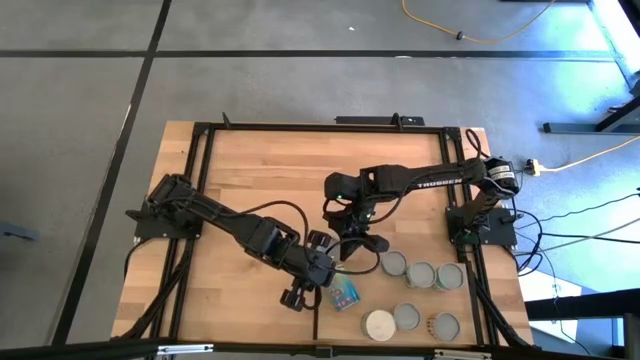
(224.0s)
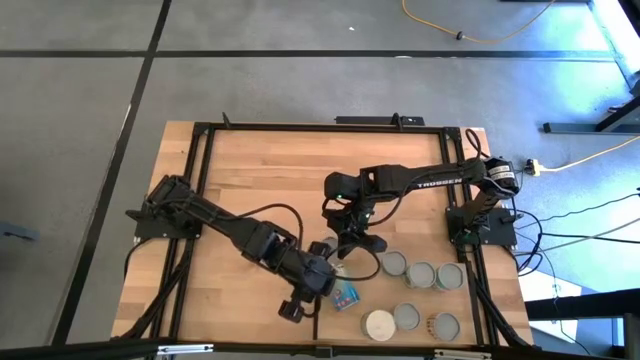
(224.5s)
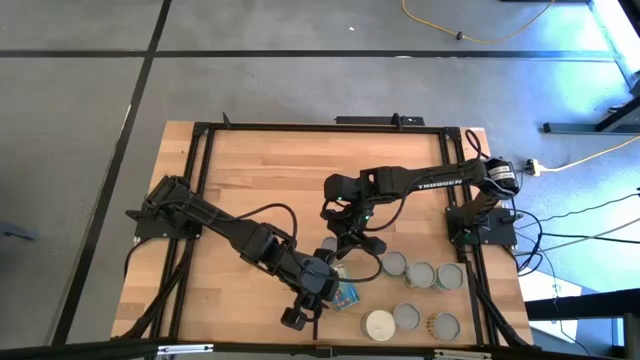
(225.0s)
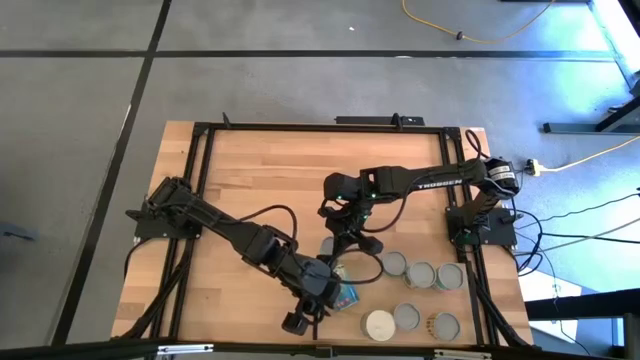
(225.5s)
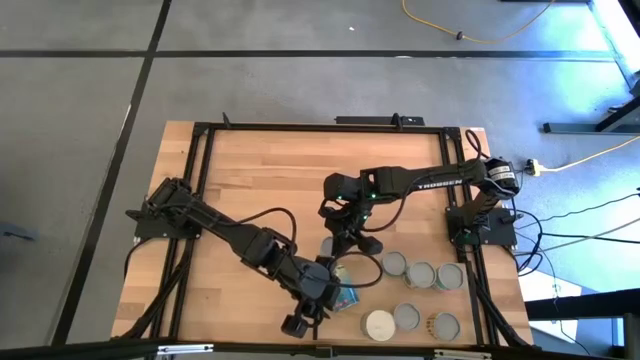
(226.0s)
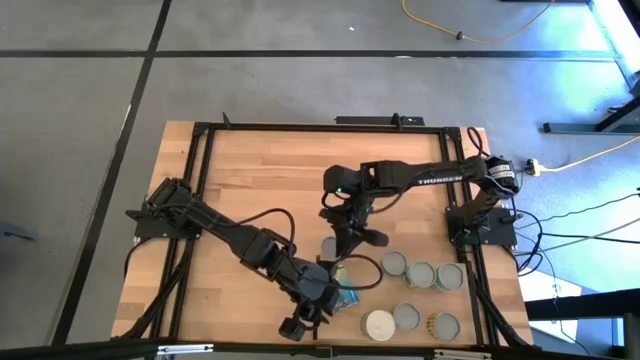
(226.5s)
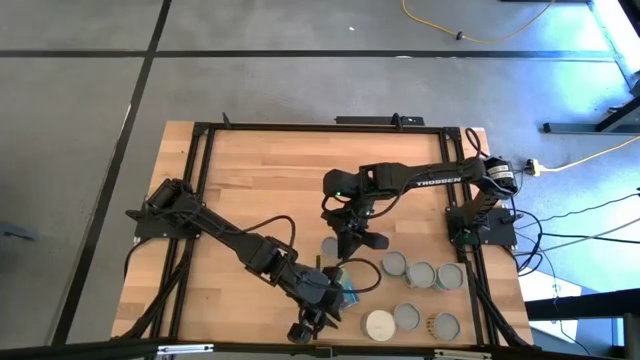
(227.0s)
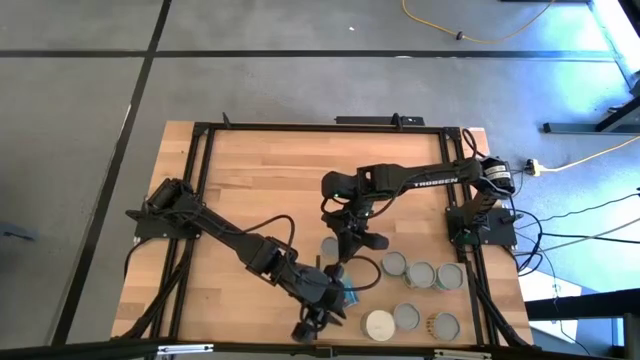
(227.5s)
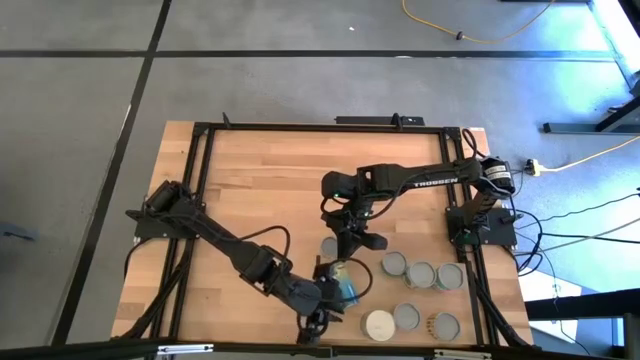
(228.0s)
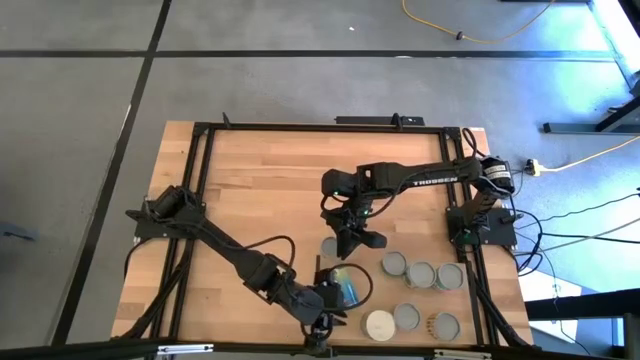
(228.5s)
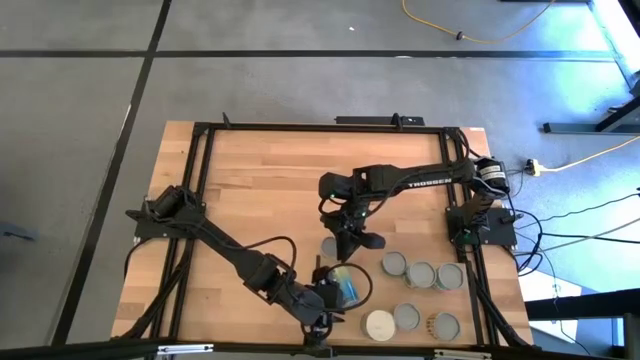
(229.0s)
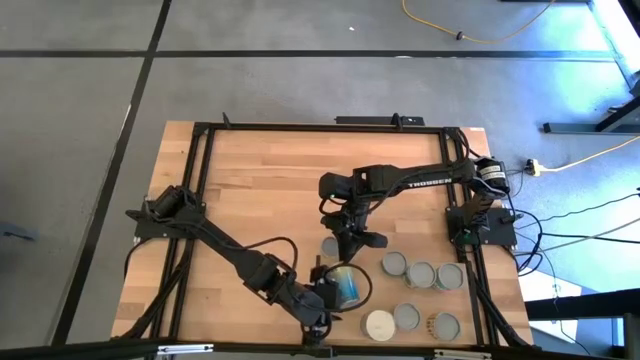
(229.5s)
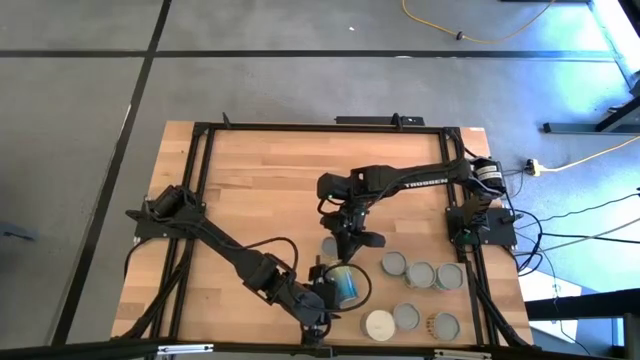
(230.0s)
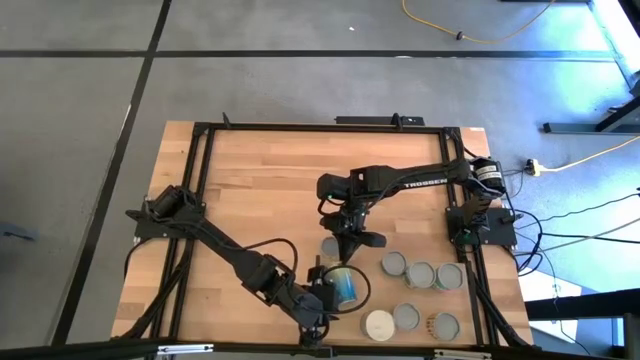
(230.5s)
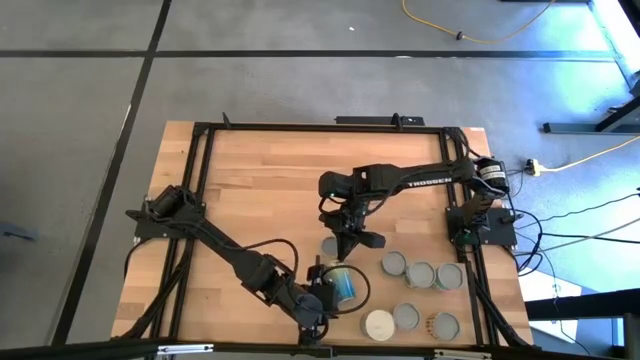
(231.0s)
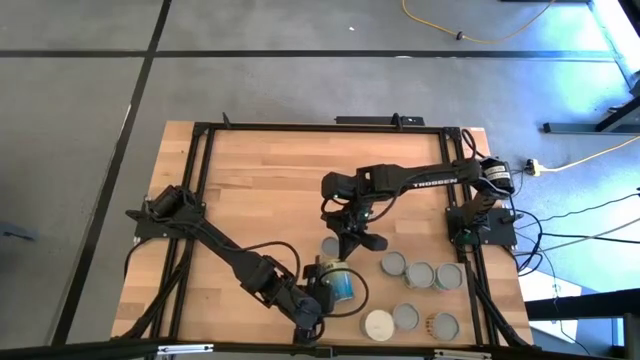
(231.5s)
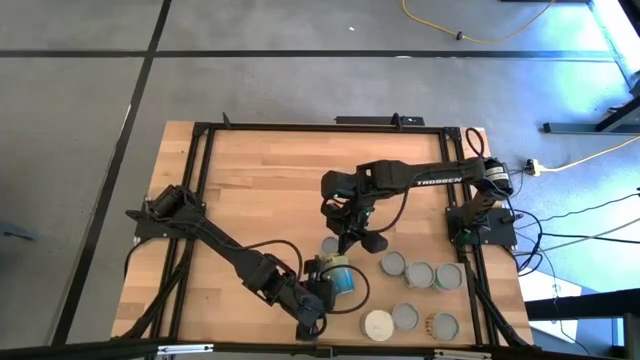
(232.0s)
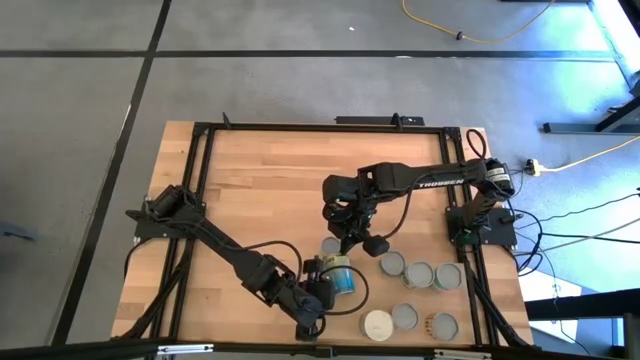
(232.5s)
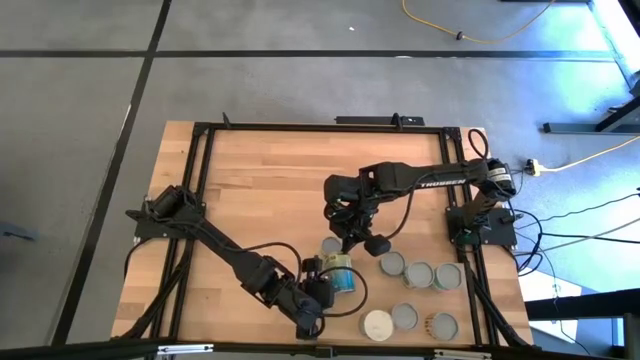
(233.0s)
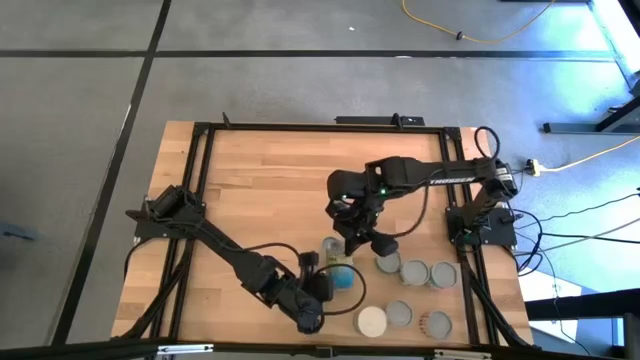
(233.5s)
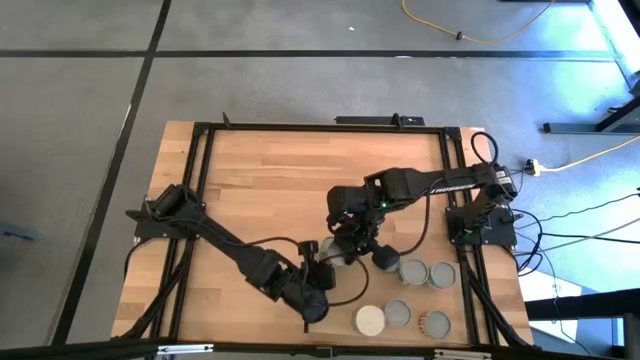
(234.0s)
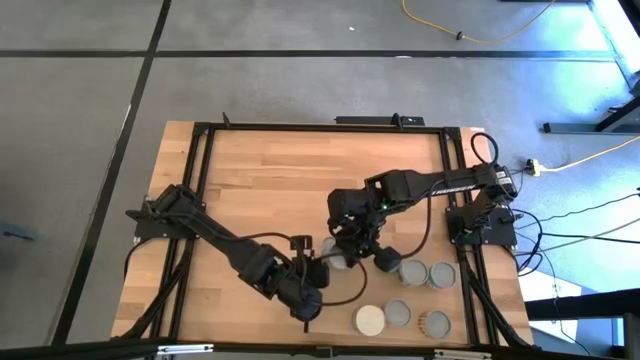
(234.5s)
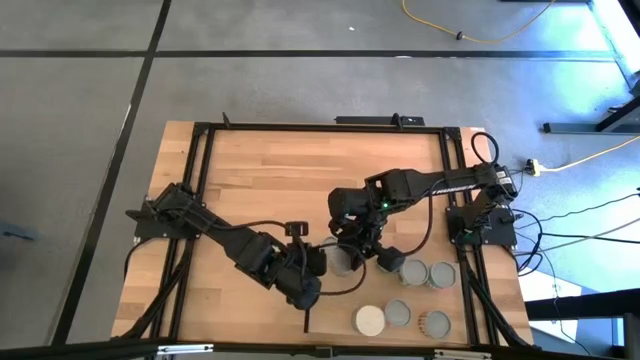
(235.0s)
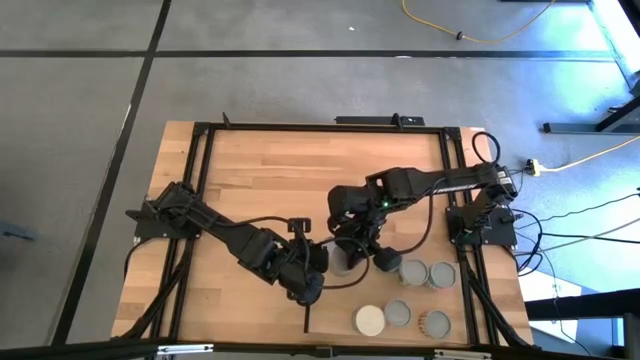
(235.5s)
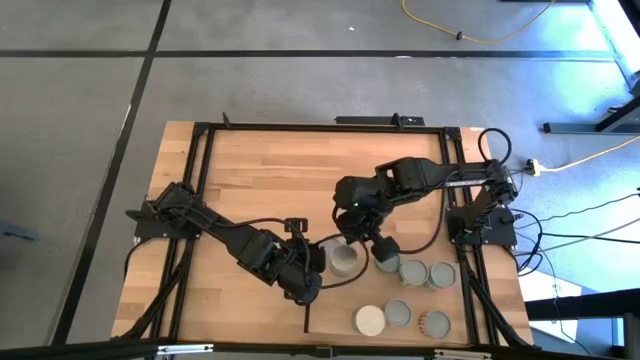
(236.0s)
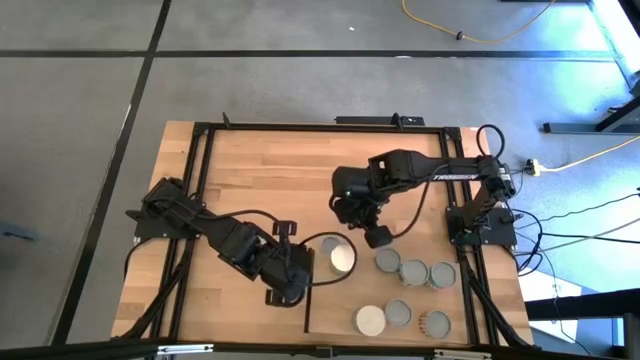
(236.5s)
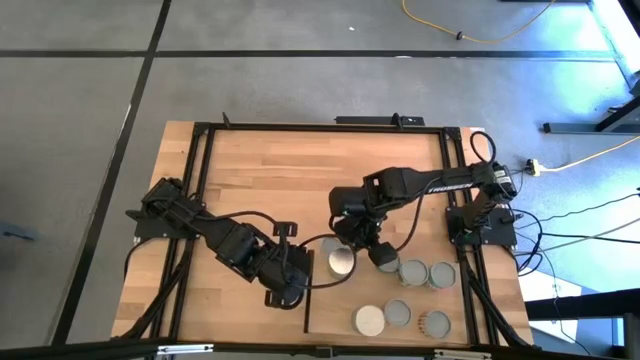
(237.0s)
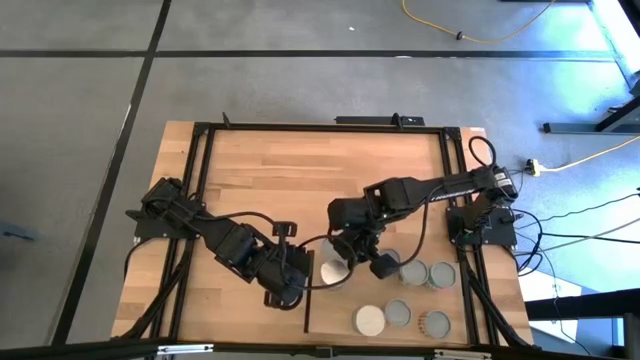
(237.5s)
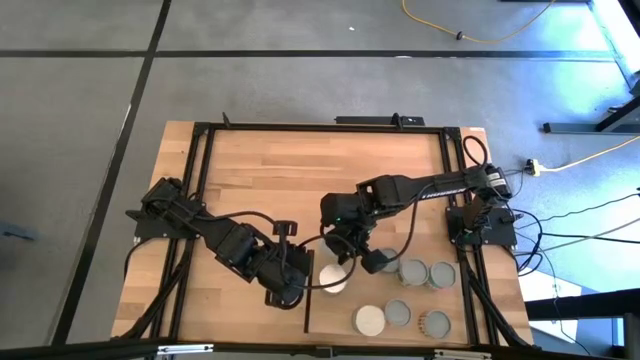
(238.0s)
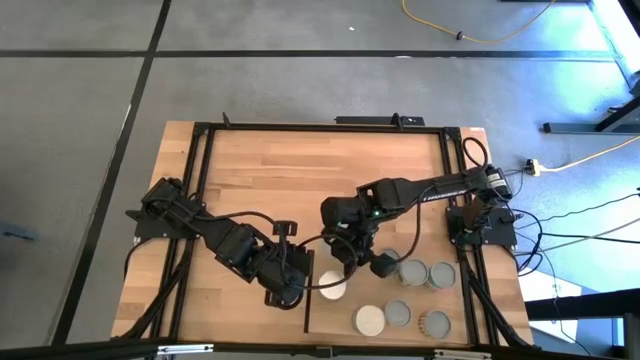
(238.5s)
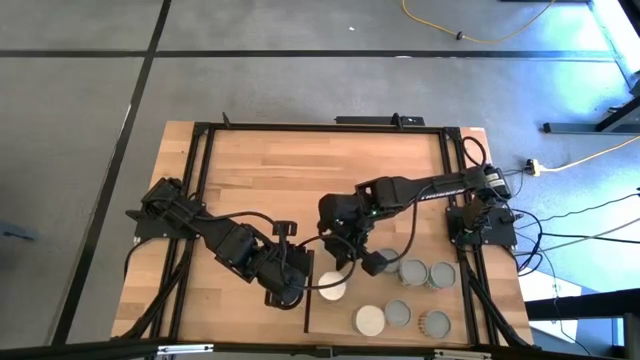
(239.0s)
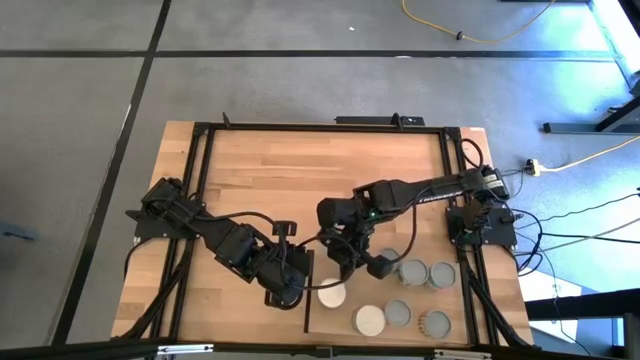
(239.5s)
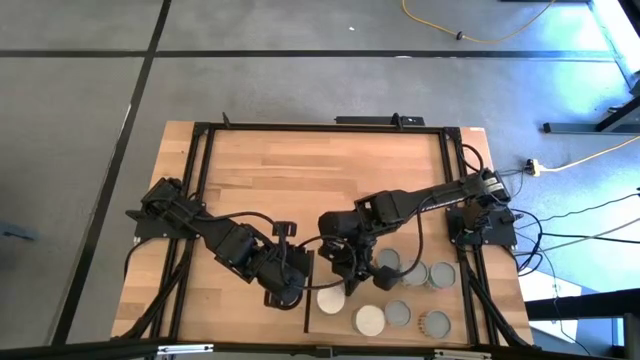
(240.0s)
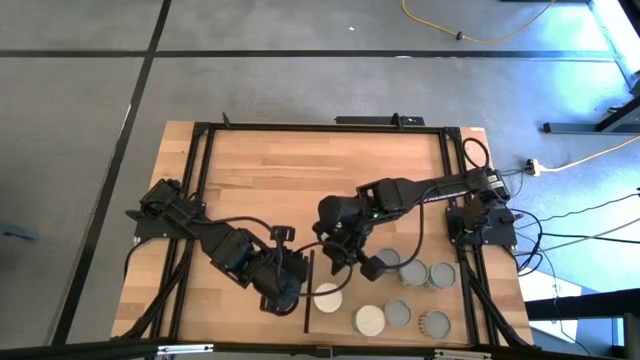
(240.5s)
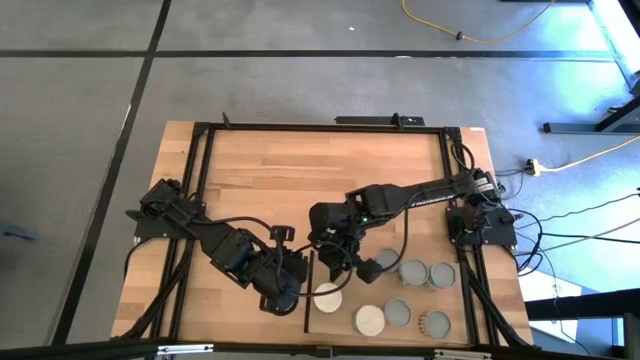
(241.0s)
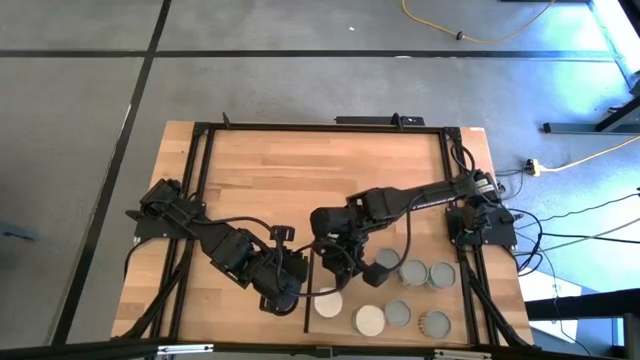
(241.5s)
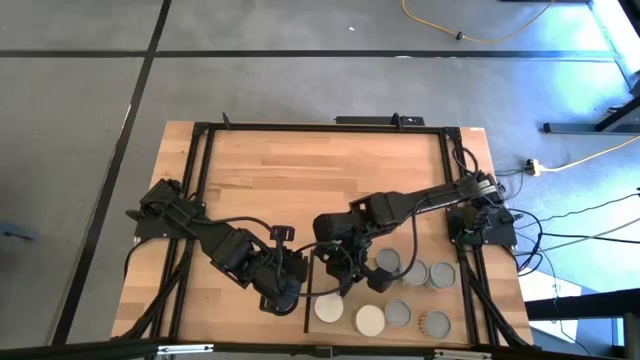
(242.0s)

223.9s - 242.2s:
Task: Pick and place cans onto a shelf
Put the blue canned cherries on the shelf

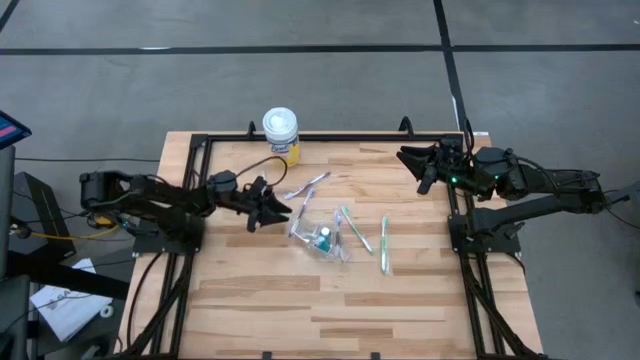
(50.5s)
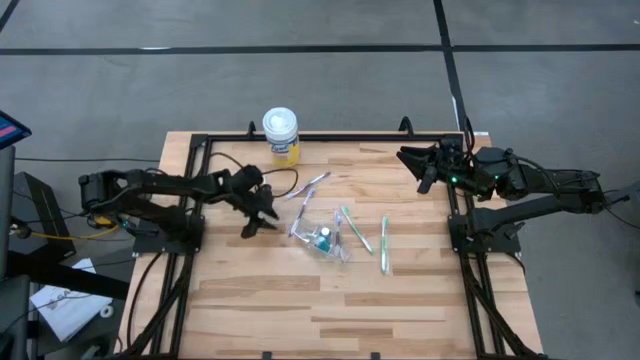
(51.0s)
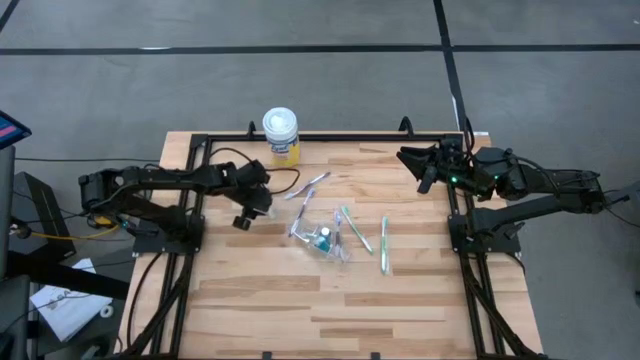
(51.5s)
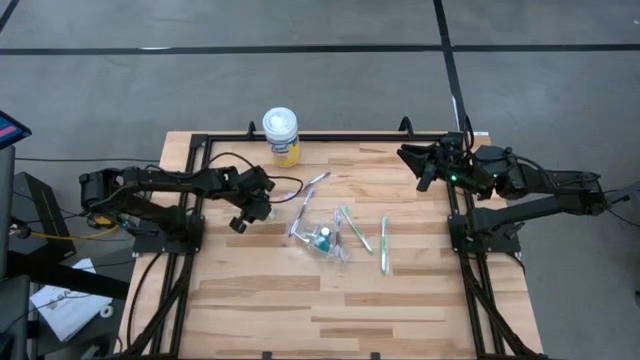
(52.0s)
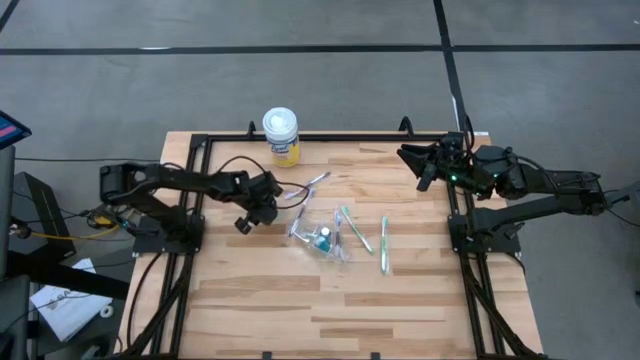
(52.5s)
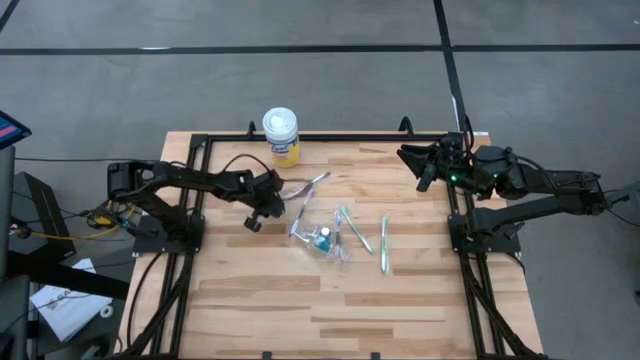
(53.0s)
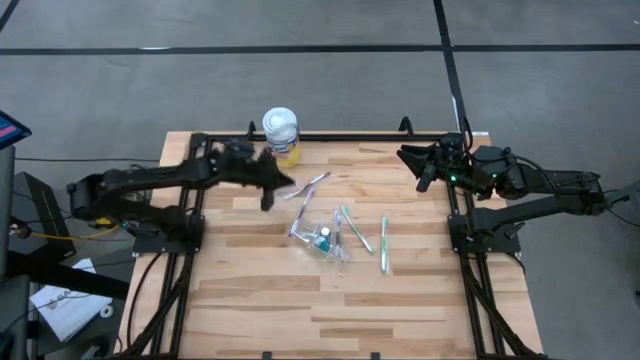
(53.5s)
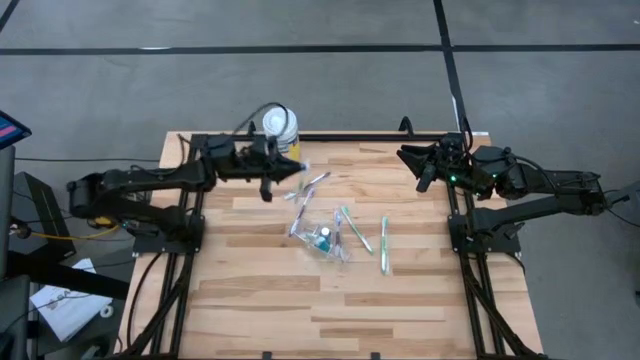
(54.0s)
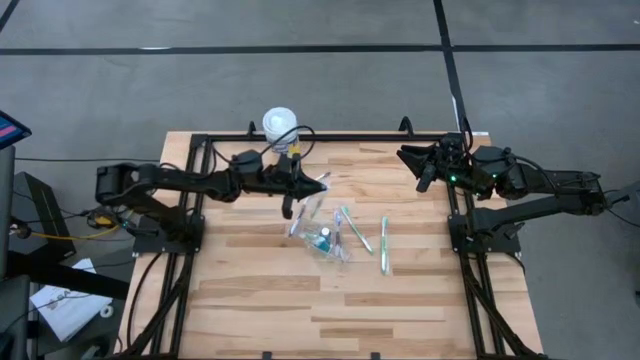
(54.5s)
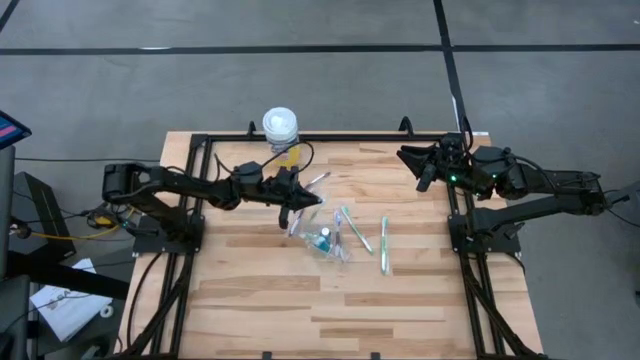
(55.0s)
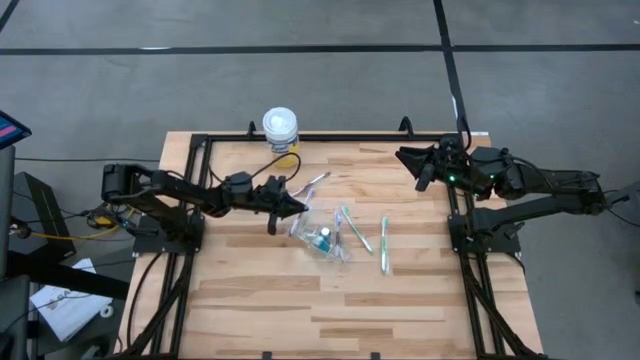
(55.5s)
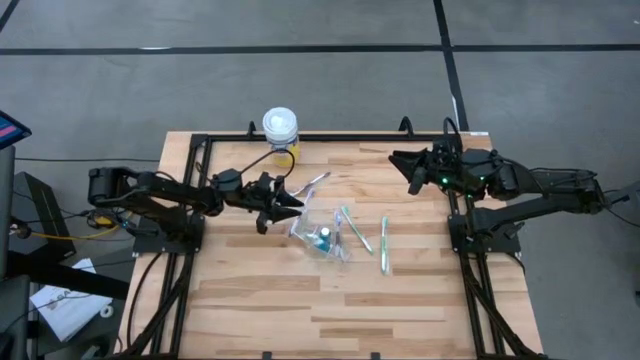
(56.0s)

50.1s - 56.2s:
Task: Pick & Place toothbrushing station
Put the green toothbrush into the left compartment of the transparent organizer
